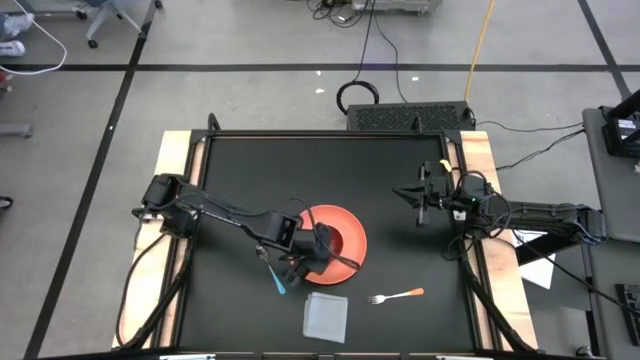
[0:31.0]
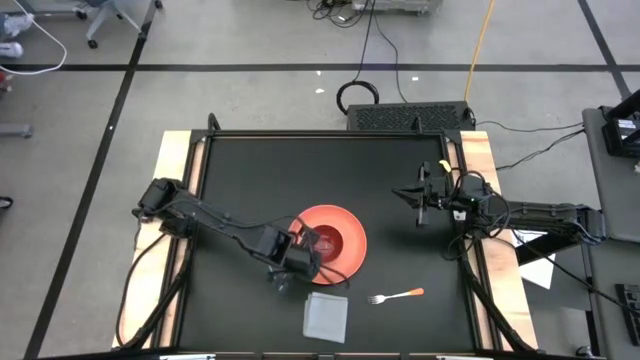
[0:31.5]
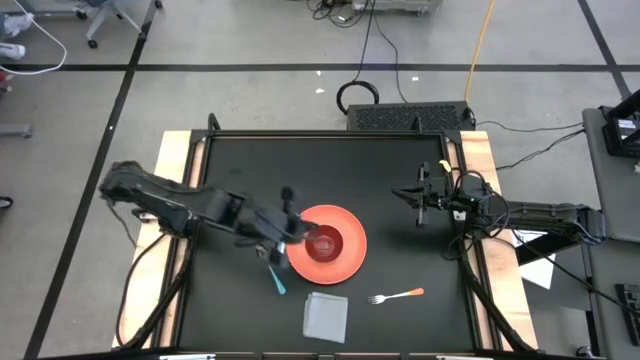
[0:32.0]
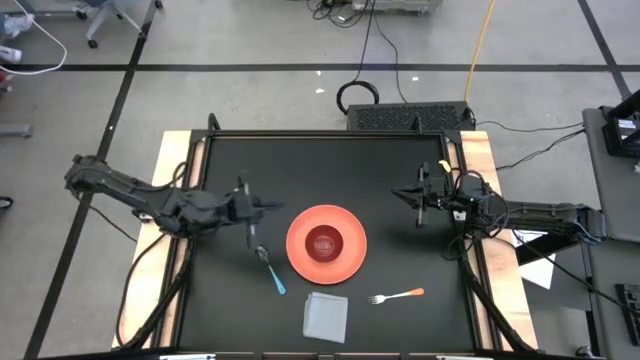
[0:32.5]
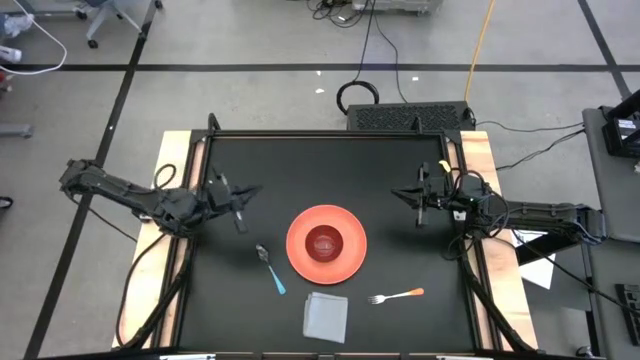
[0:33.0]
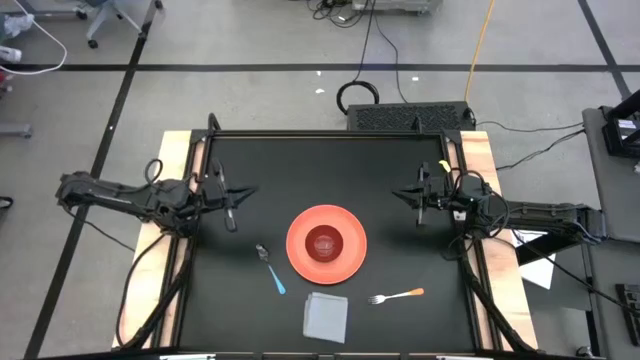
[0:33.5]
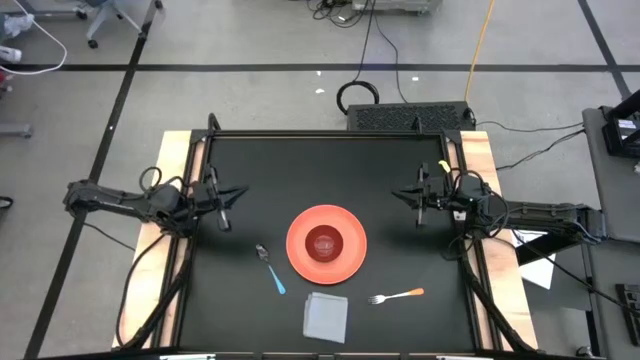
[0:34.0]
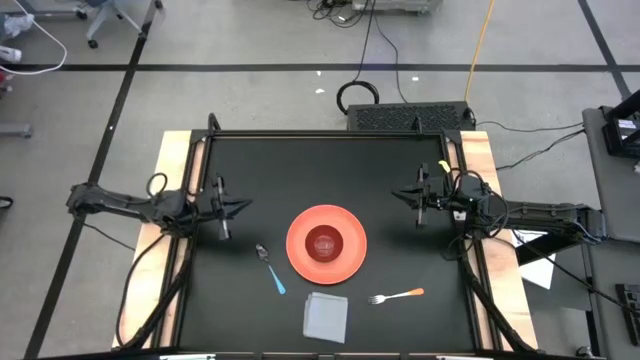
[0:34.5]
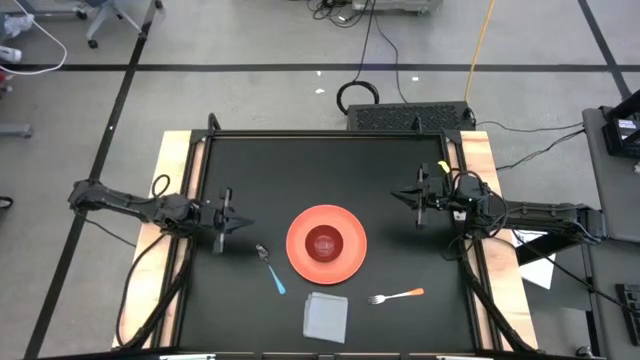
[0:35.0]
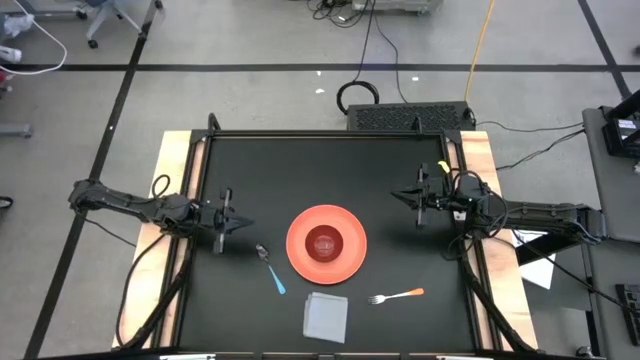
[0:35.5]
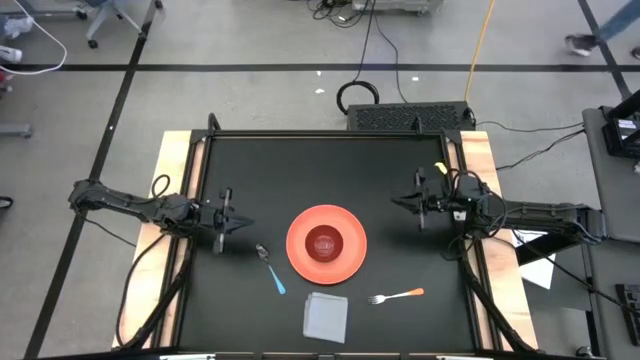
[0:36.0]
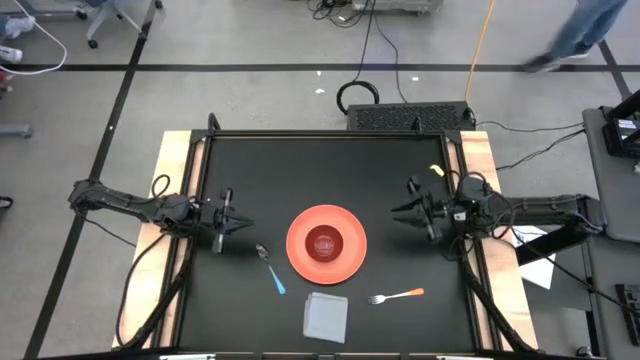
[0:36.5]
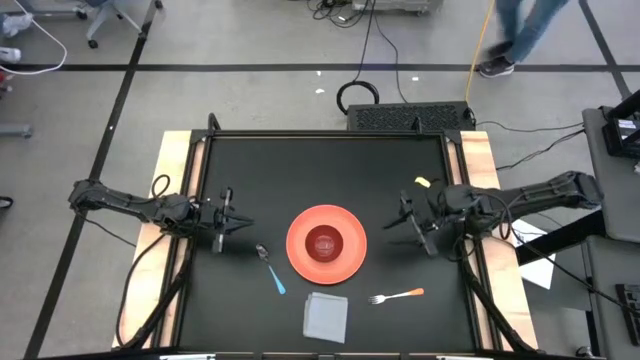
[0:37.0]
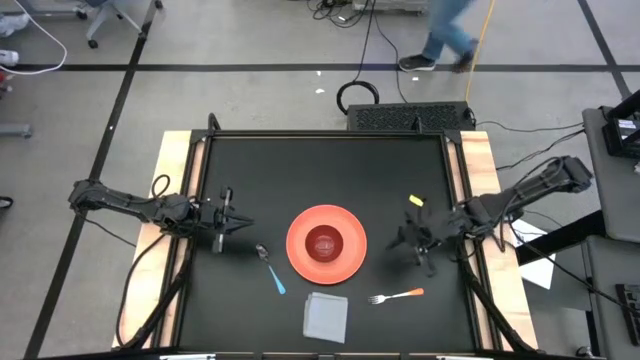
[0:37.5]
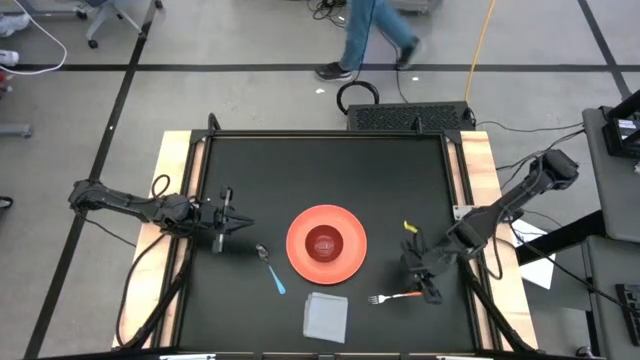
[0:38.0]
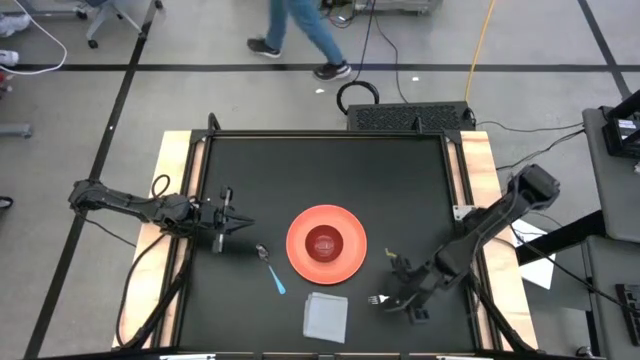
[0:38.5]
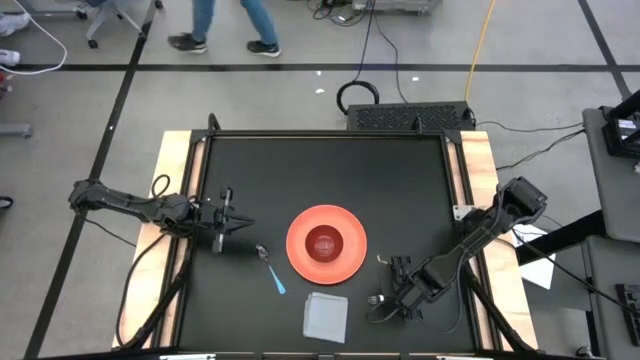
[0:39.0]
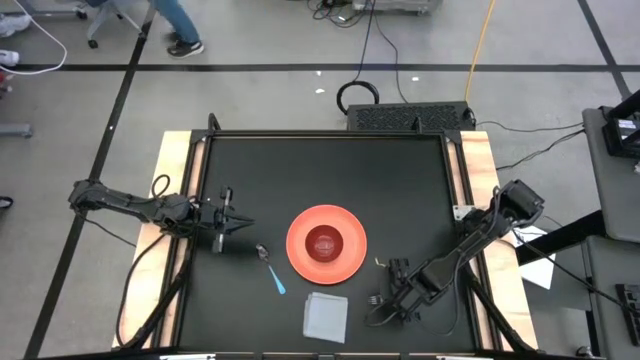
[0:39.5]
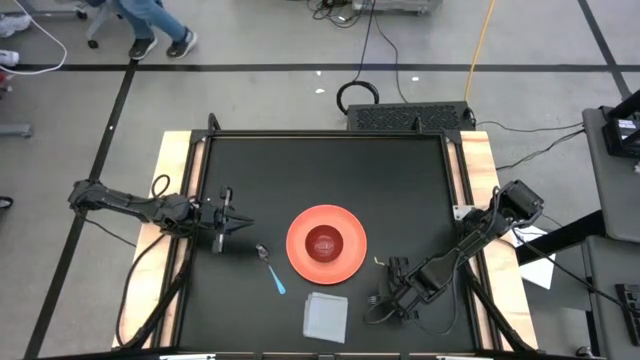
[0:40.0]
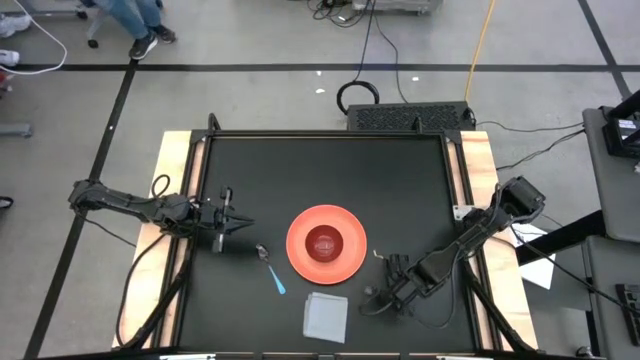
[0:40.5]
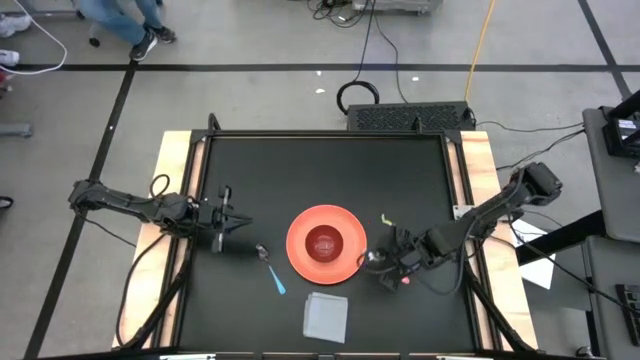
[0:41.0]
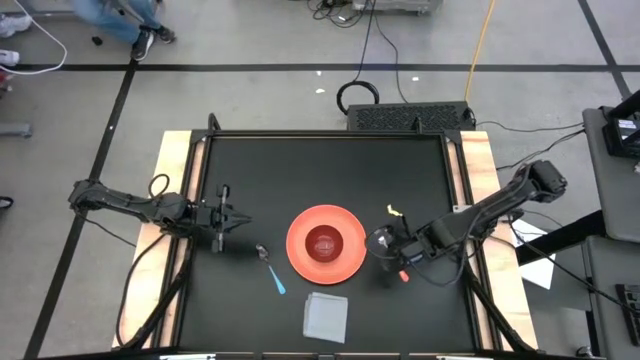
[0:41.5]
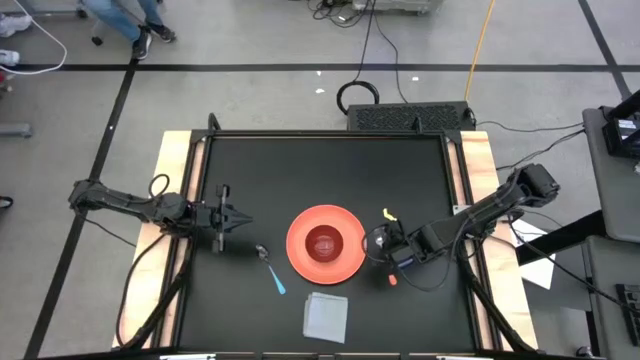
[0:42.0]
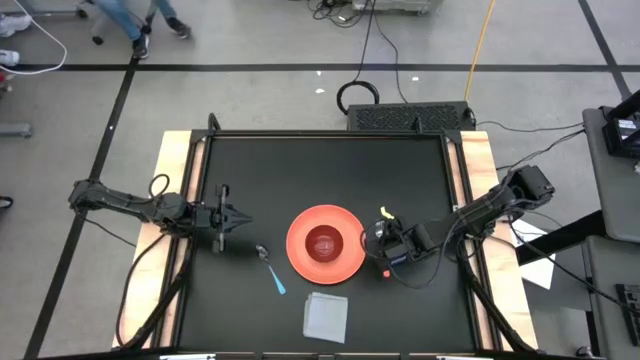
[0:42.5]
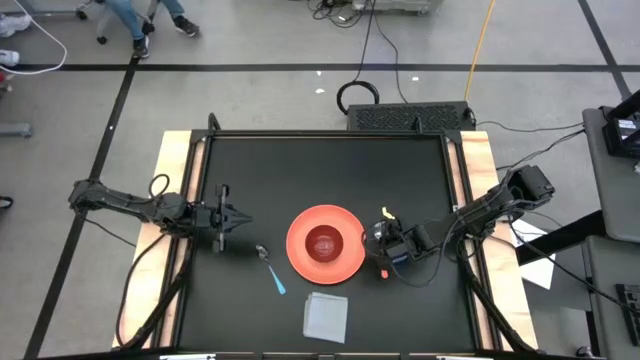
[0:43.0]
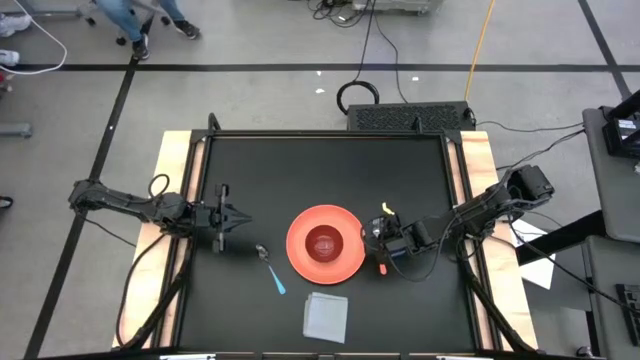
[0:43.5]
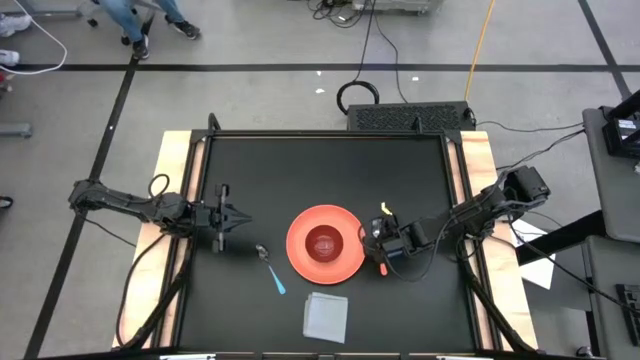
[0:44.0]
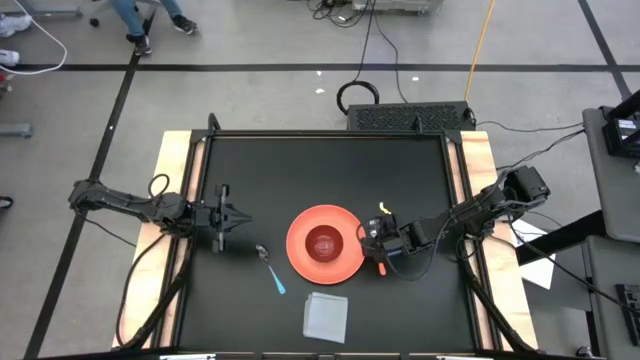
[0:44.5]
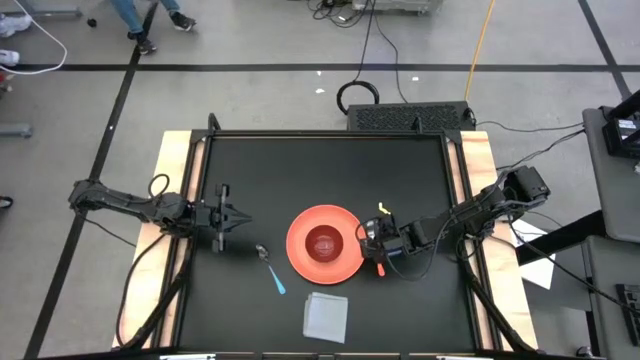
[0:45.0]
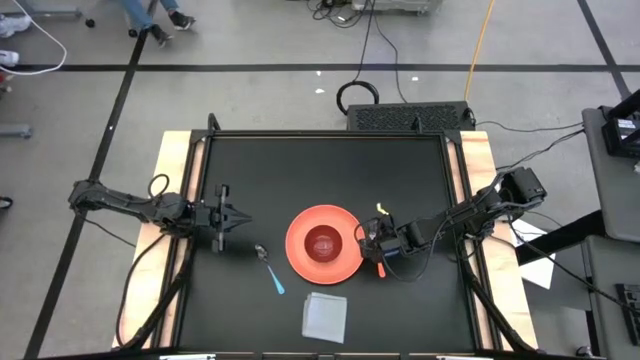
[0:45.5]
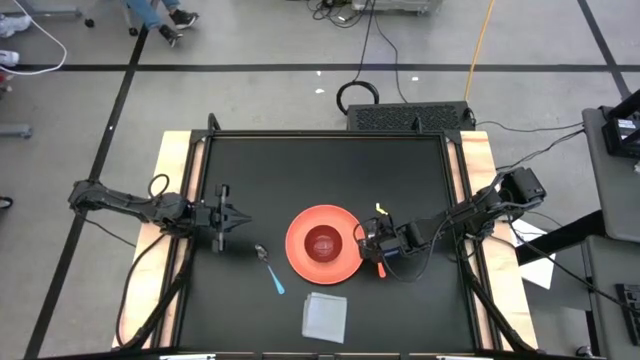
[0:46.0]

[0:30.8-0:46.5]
Task: Set table place
Put the orange fork to the right of the orange plate

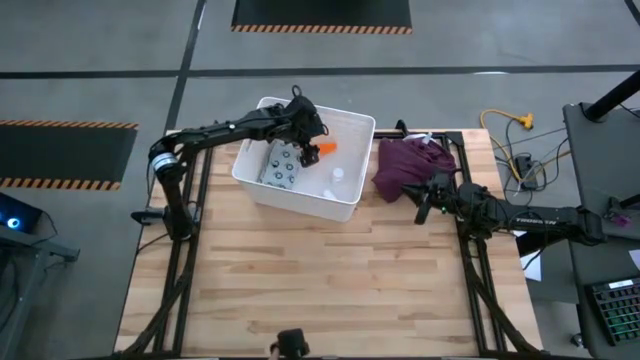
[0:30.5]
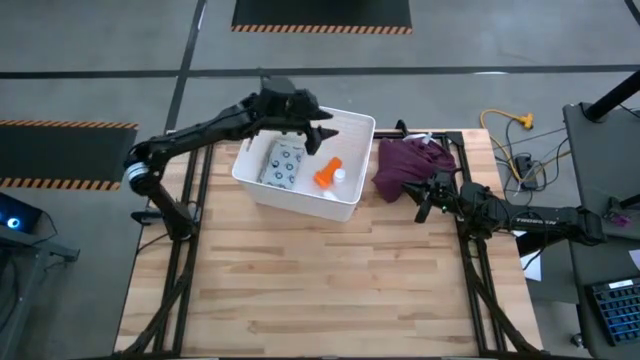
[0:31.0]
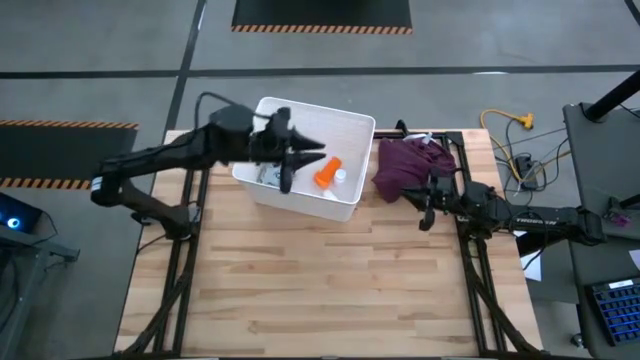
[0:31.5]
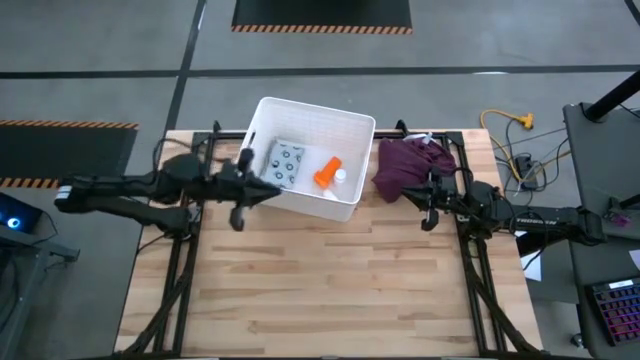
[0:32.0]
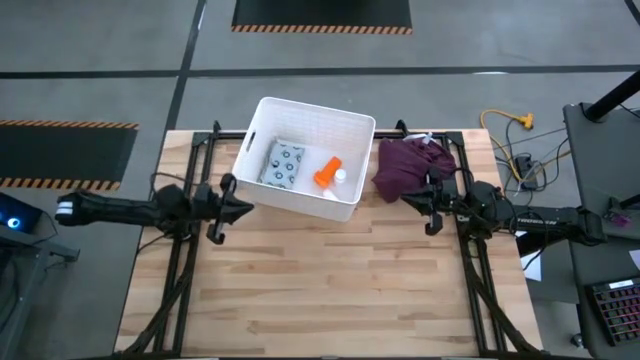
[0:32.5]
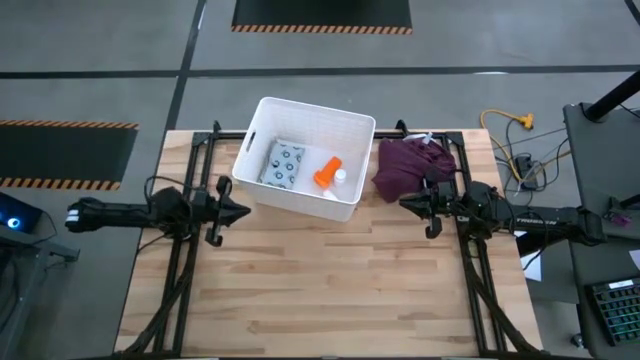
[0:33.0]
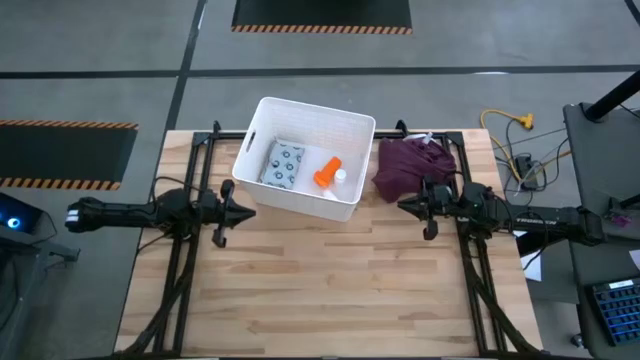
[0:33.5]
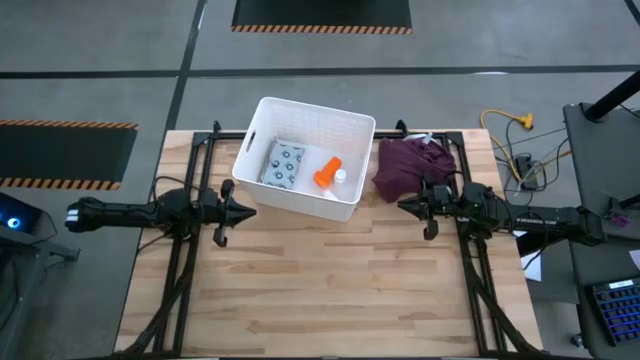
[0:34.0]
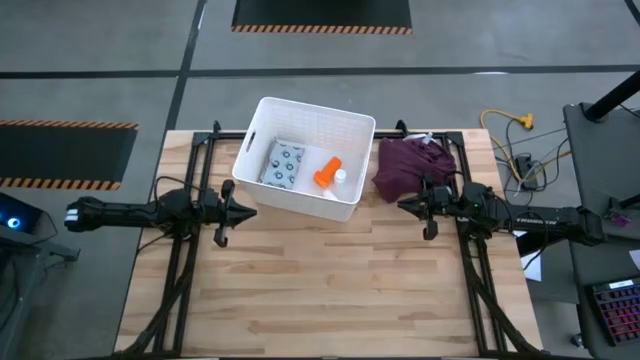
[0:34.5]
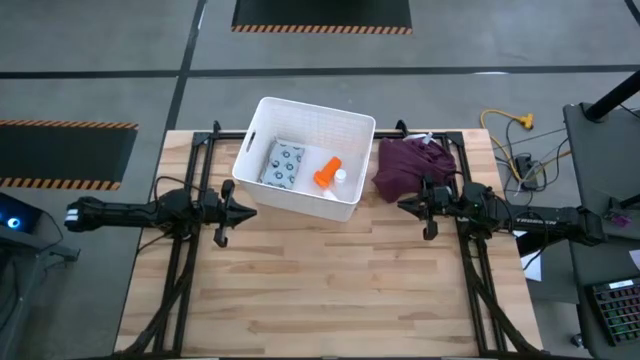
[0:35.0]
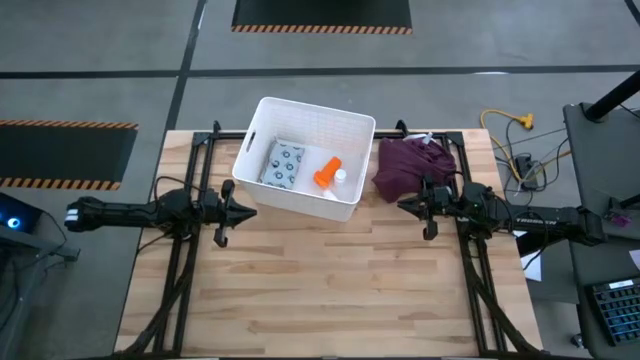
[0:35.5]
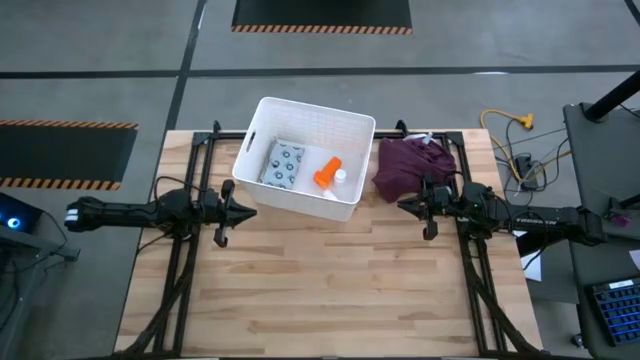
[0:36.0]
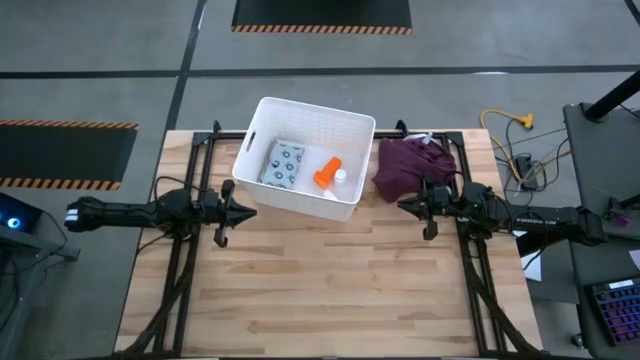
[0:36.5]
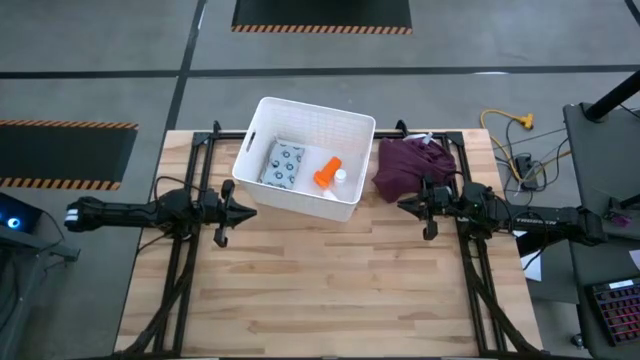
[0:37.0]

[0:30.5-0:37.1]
Task: Pick & place medical supplies in basket/bin
Return to Home Position
